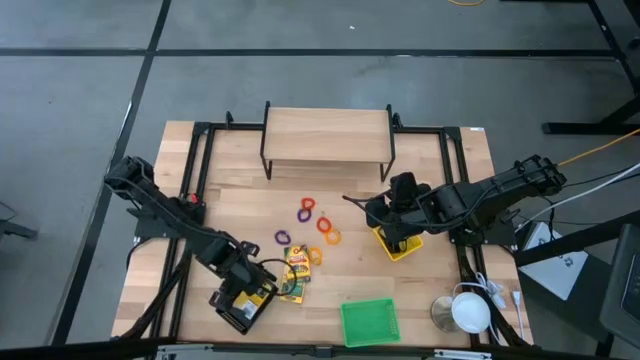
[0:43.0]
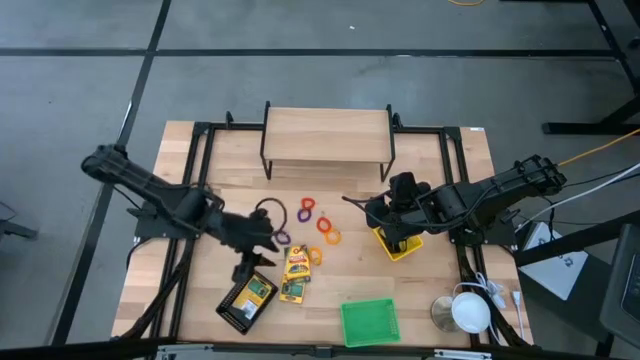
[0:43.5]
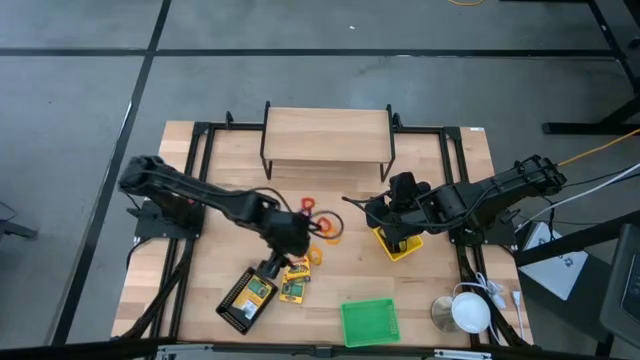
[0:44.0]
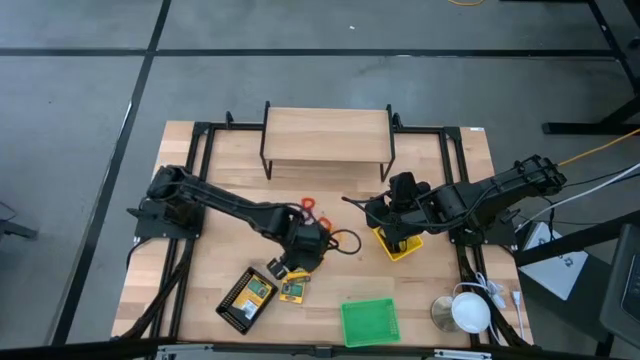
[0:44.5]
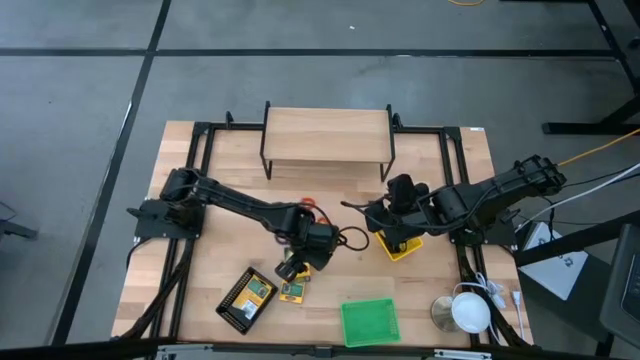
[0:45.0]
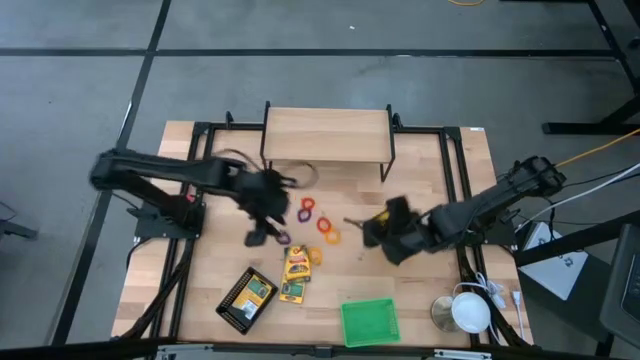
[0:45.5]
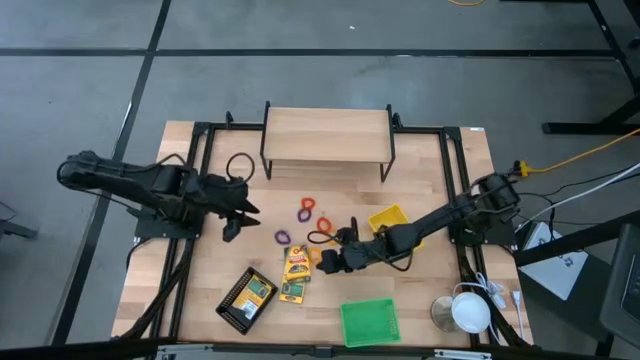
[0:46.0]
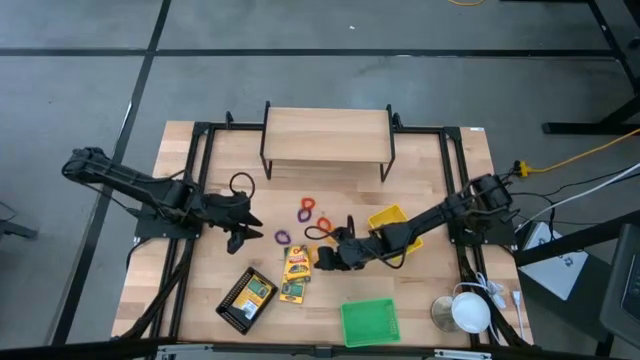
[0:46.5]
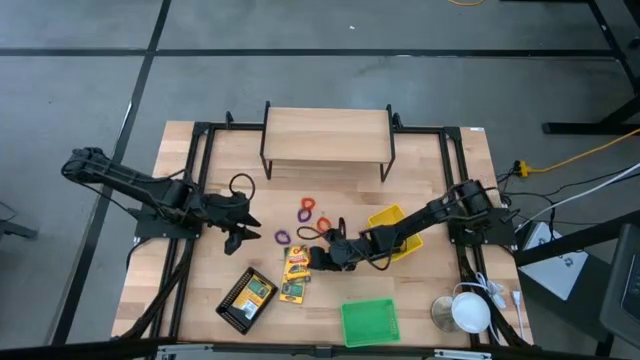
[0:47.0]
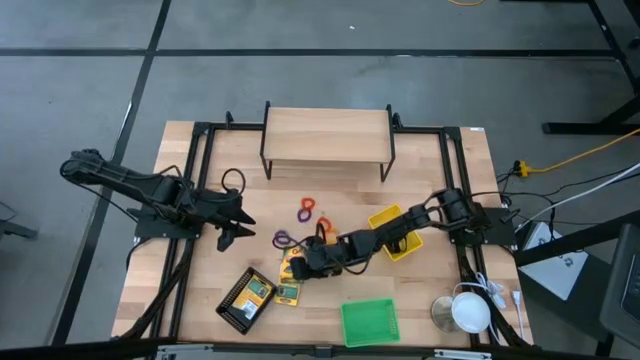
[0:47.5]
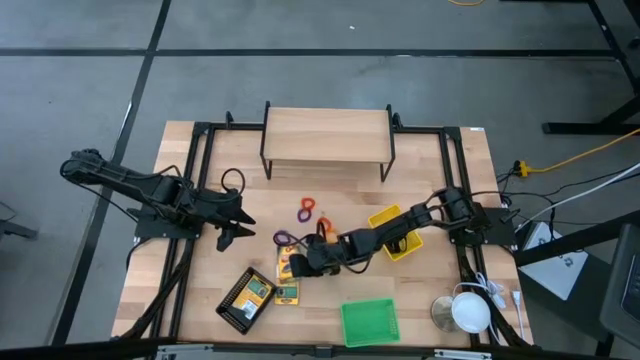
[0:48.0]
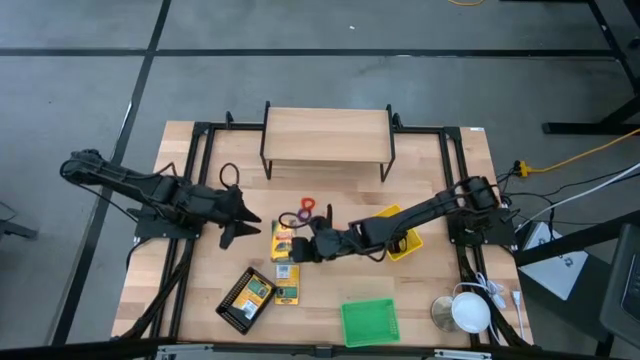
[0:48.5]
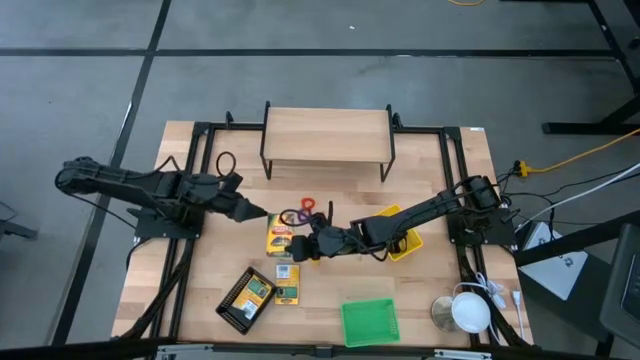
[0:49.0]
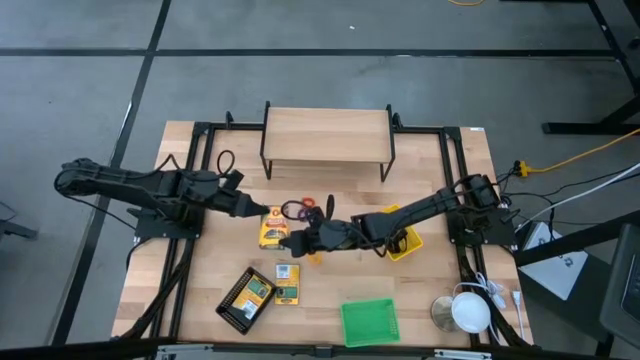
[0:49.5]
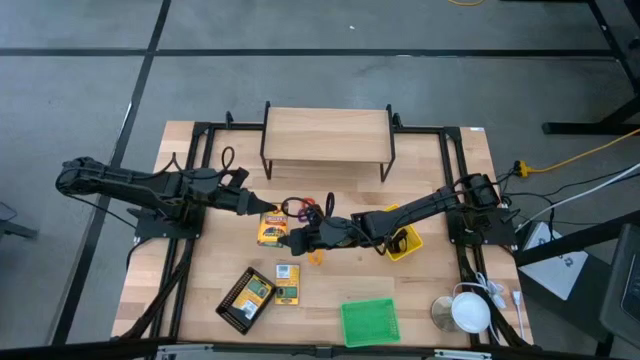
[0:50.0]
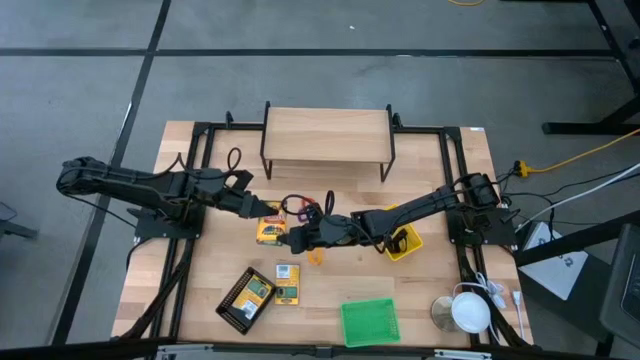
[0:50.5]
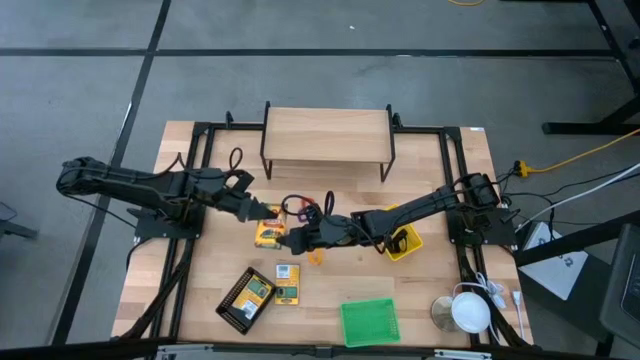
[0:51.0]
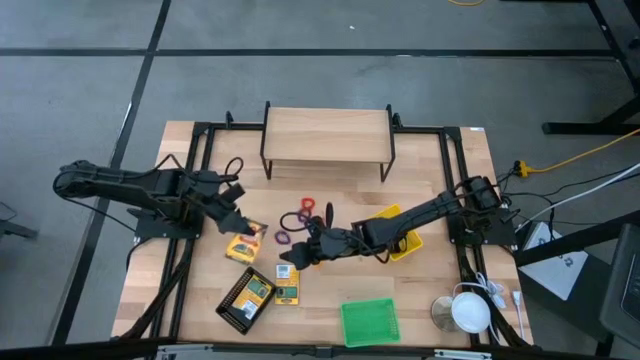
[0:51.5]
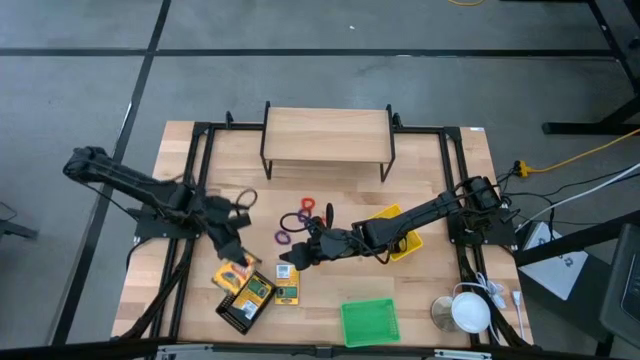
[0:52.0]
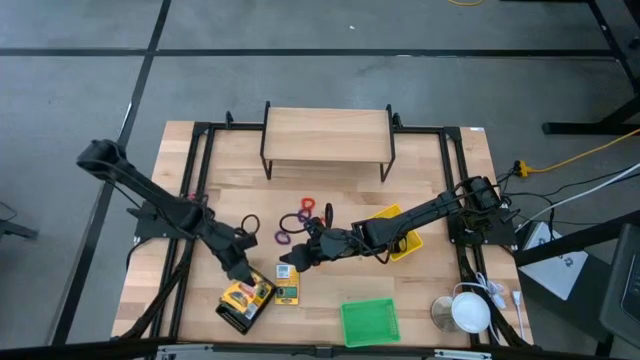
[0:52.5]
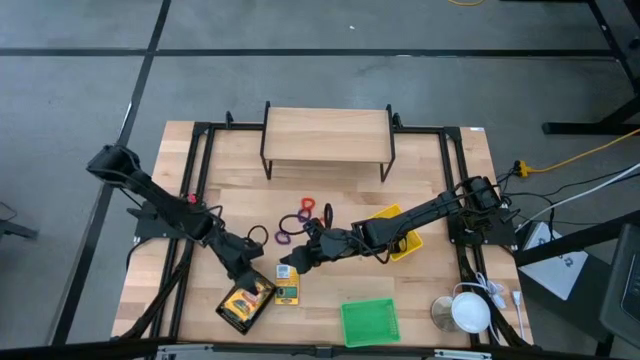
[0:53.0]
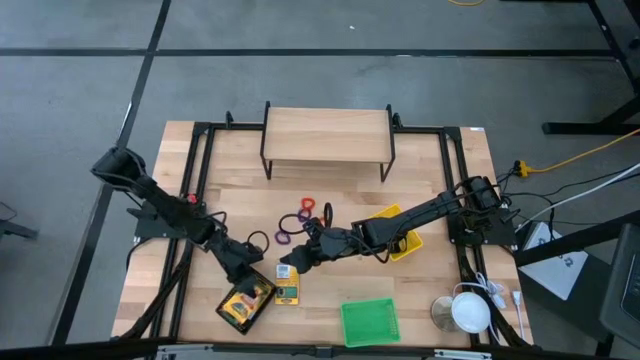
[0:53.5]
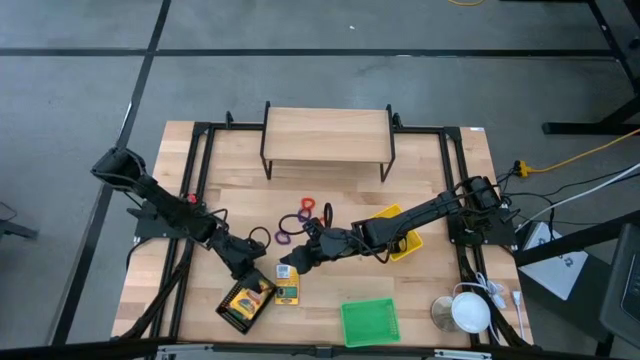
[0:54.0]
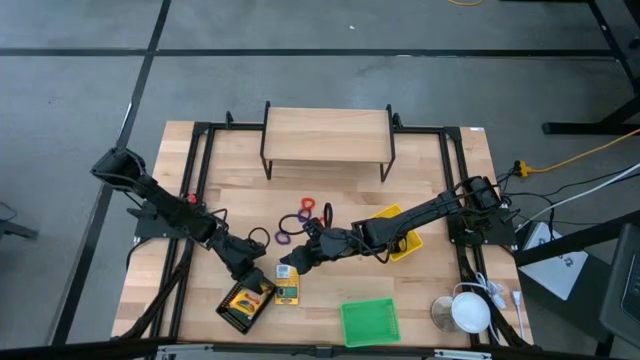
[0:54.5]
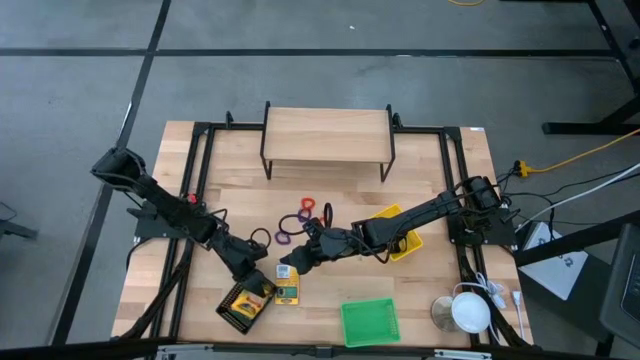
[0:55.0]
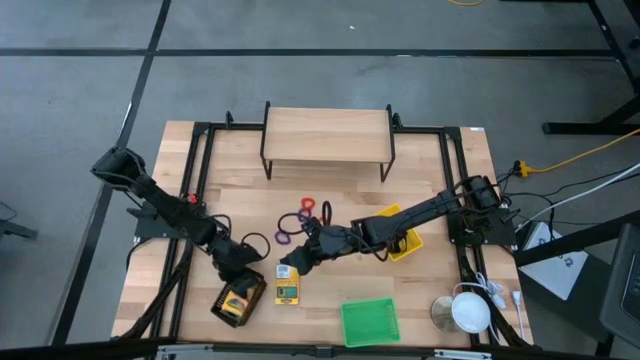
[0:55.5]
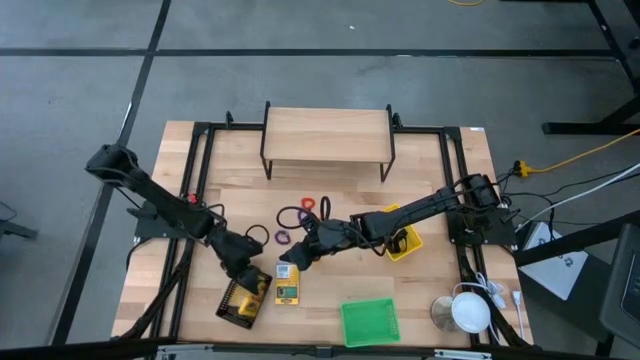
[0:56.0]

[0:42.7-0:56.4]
Task: Pick & Place Office Desk Supplies
Put the yellow crayon box into the black basket

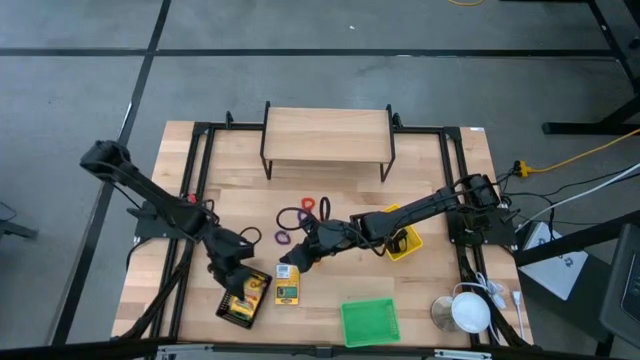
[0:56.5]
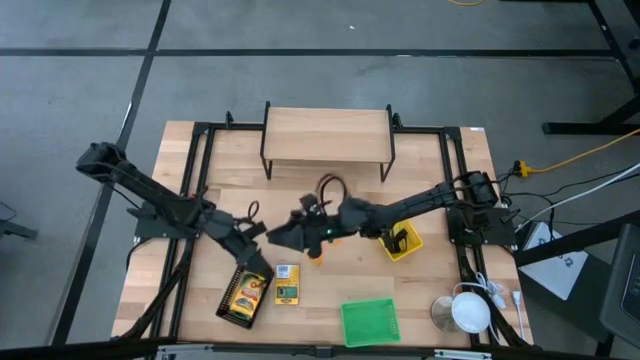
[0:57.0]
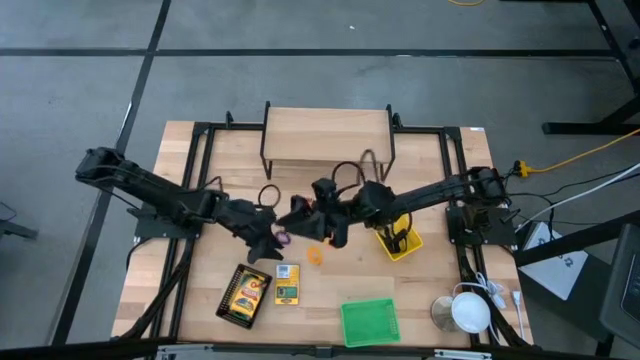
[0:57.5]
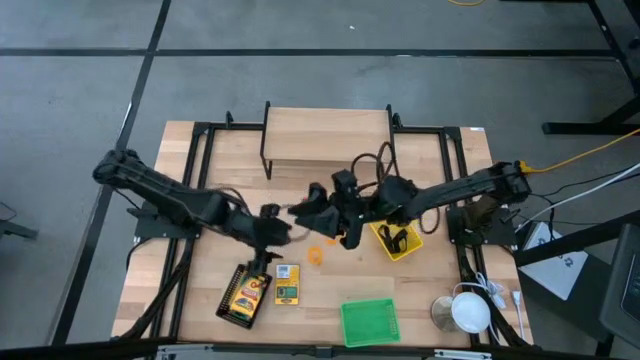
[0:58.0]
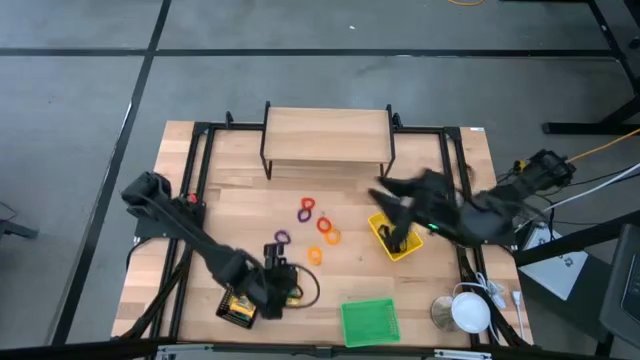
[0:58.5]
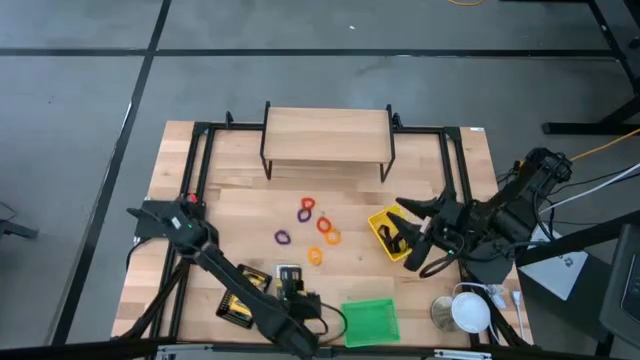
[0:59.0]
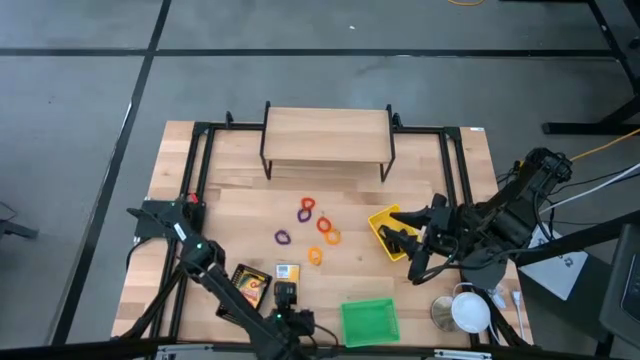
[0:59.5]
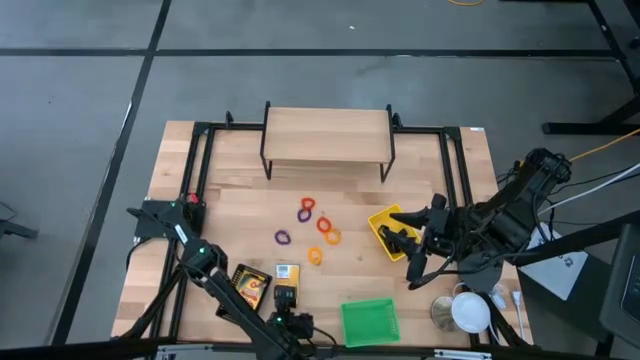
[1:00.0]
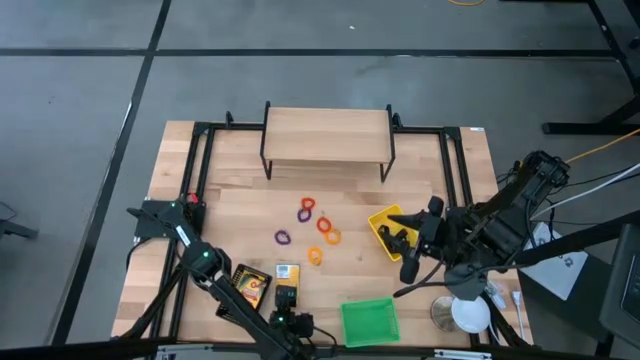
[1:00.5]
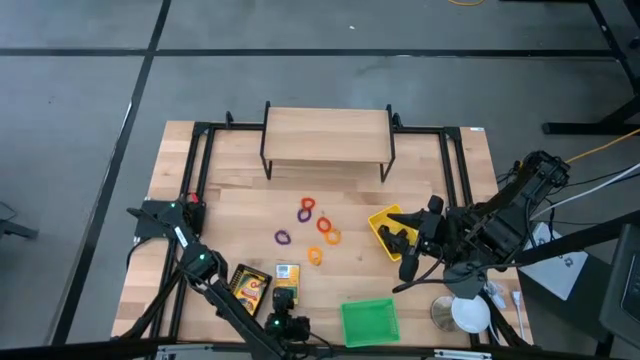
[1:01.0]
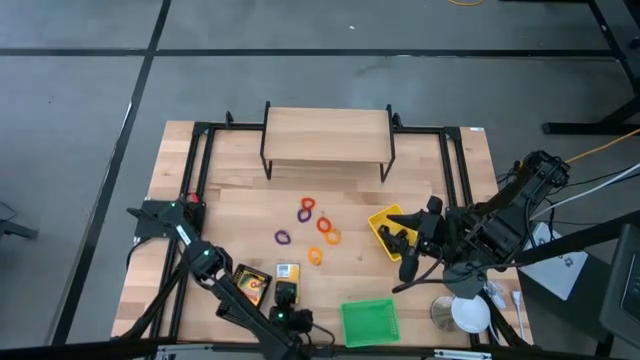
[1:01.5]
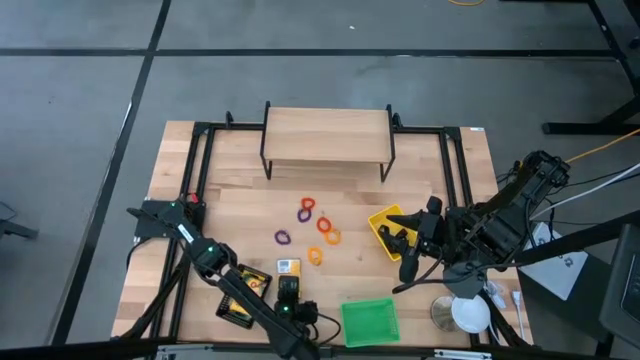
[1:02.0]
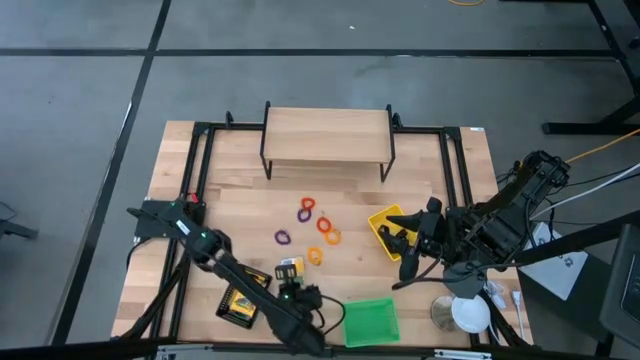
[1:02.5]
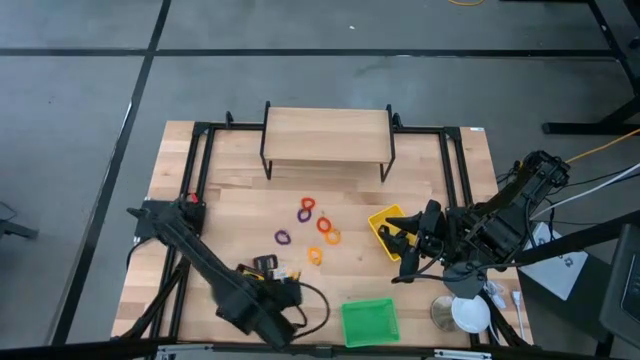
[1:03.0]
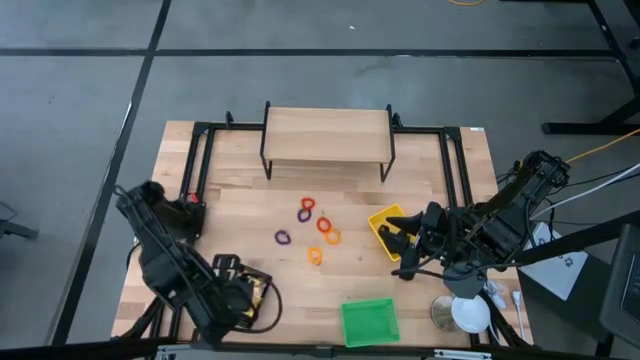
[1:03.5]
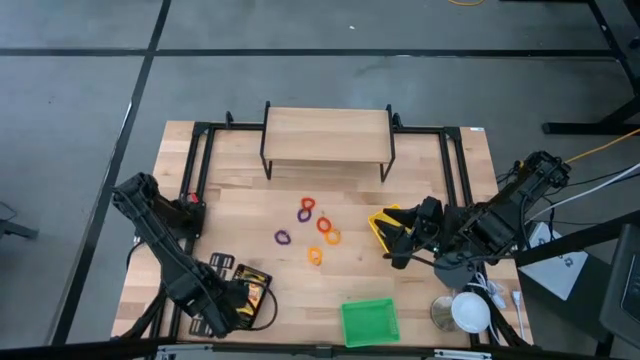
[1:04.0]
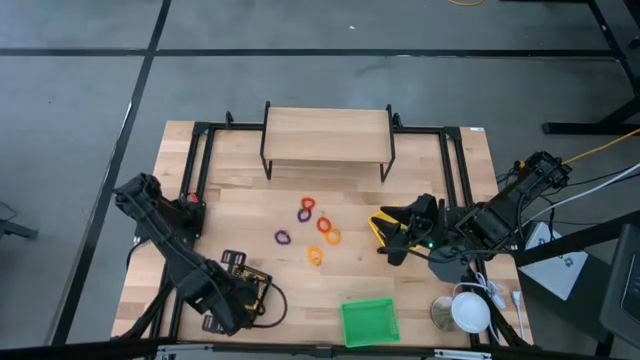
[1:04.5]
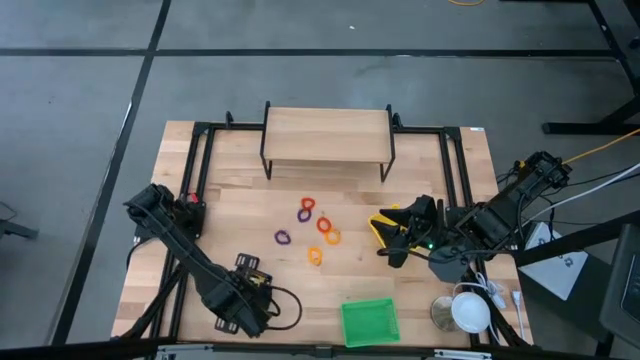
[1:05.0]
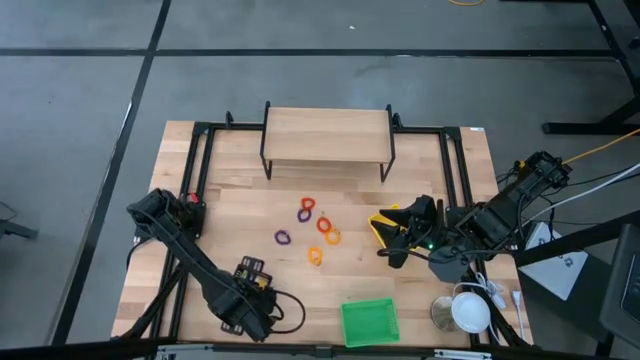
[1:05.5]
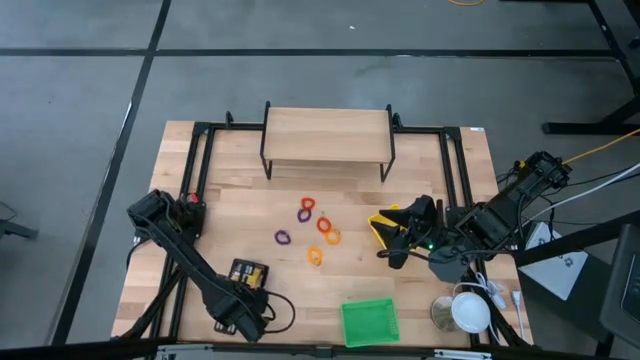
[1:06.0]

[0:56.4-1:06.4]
Put the yellow crayon box into the black basket
